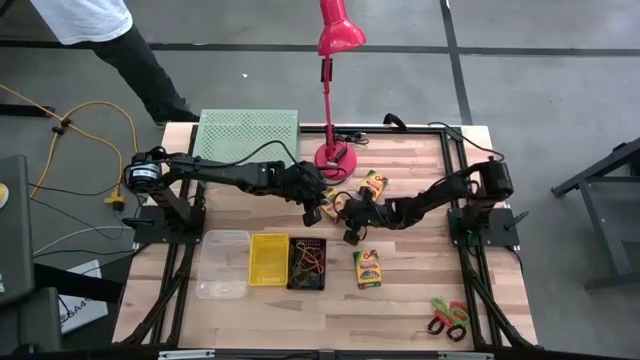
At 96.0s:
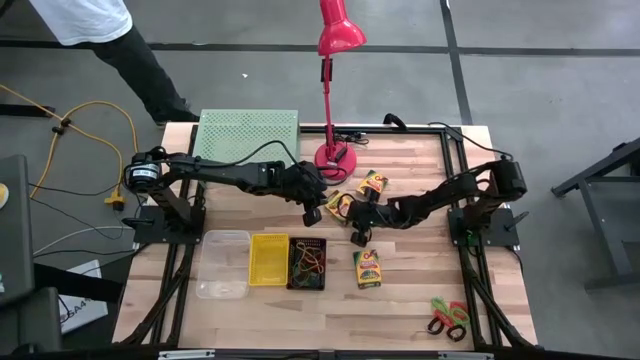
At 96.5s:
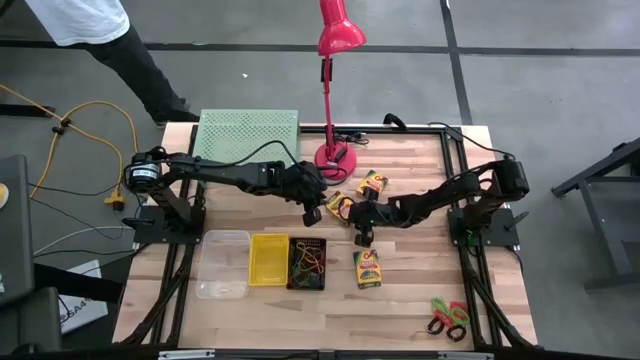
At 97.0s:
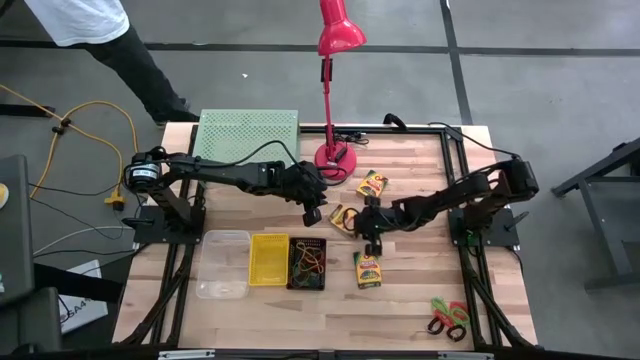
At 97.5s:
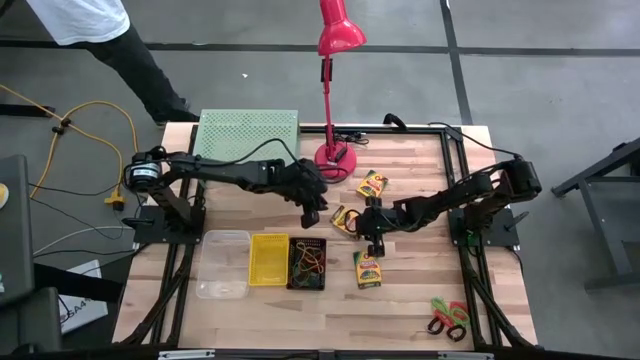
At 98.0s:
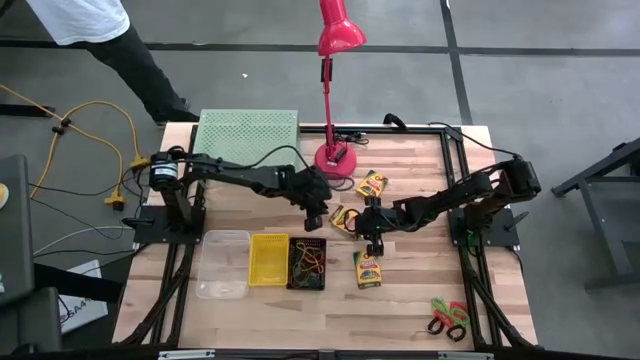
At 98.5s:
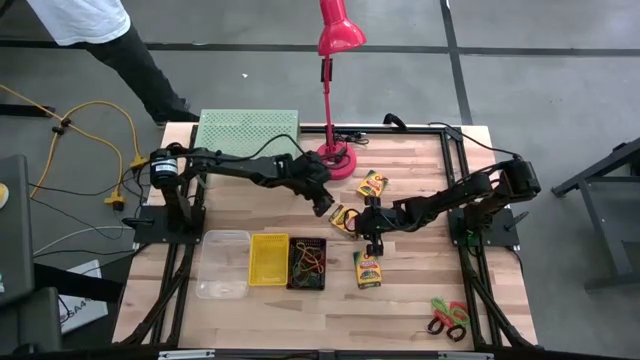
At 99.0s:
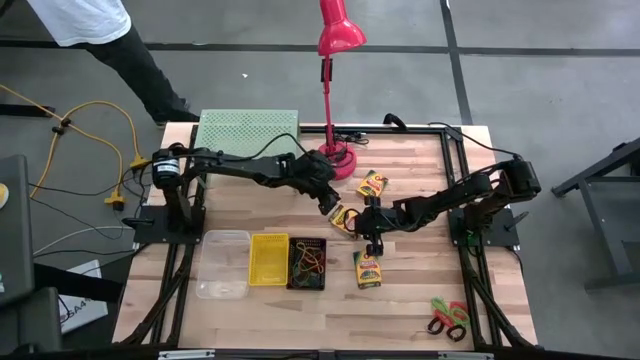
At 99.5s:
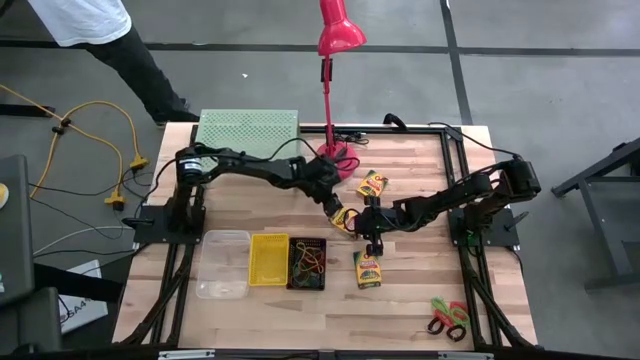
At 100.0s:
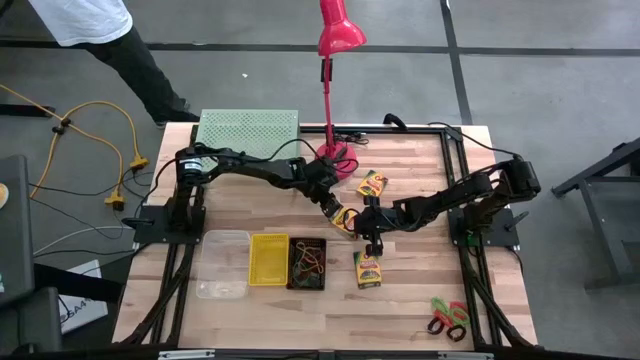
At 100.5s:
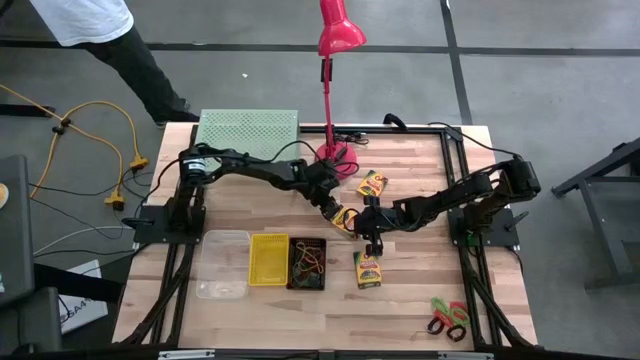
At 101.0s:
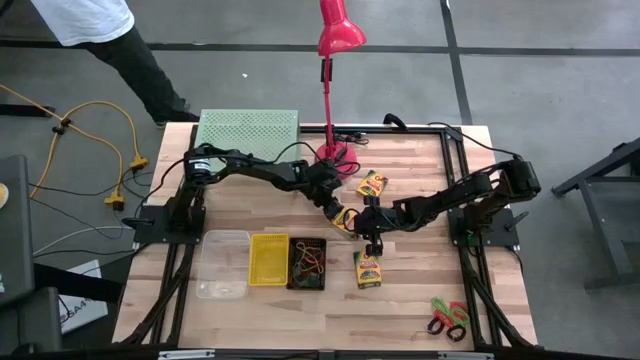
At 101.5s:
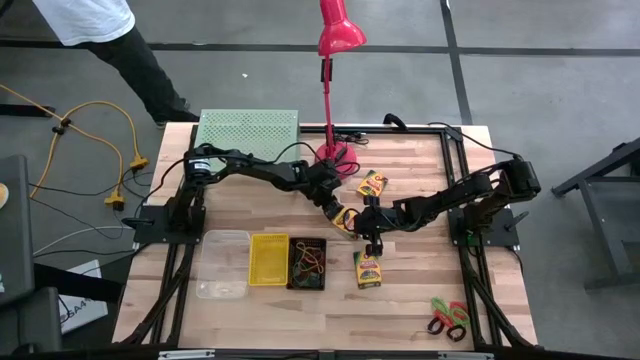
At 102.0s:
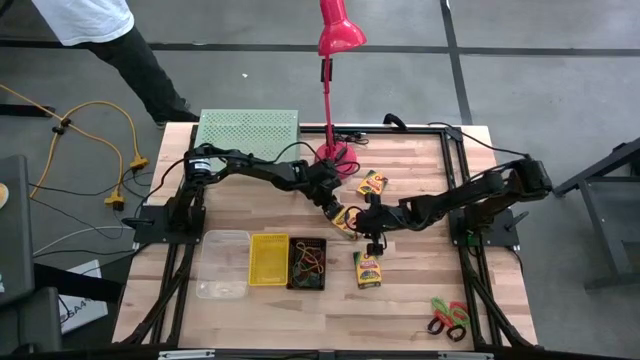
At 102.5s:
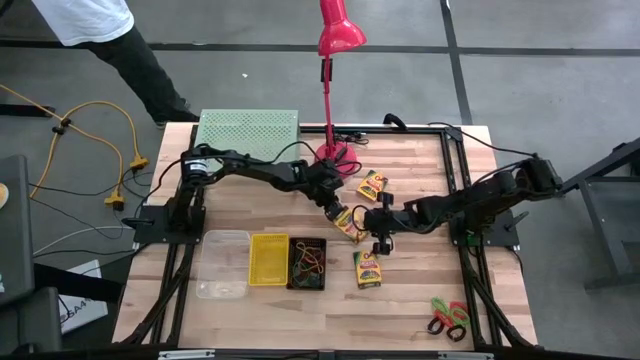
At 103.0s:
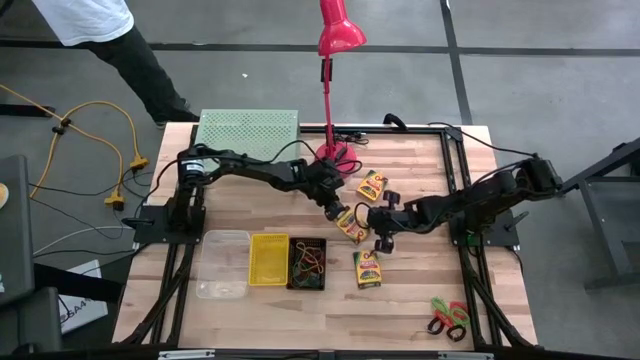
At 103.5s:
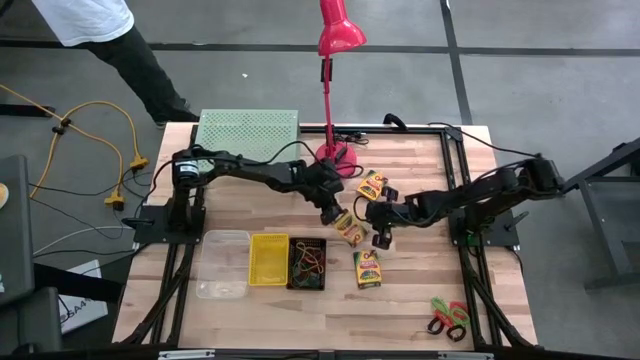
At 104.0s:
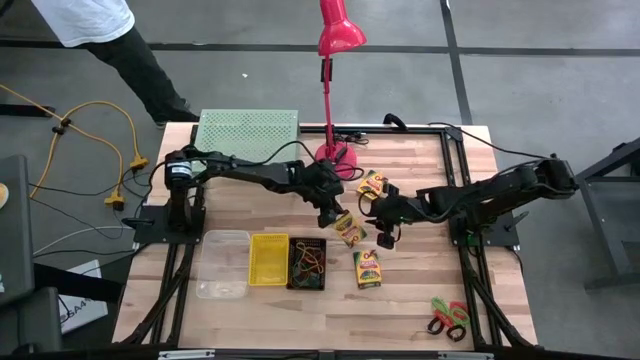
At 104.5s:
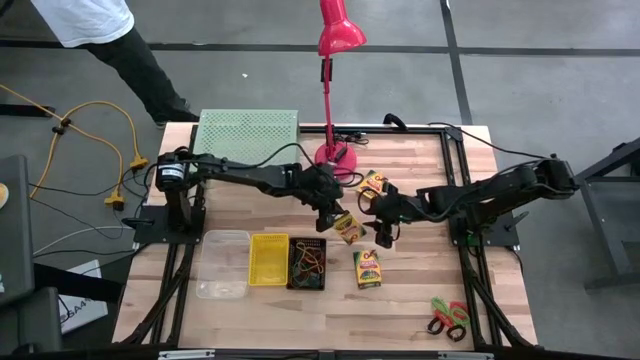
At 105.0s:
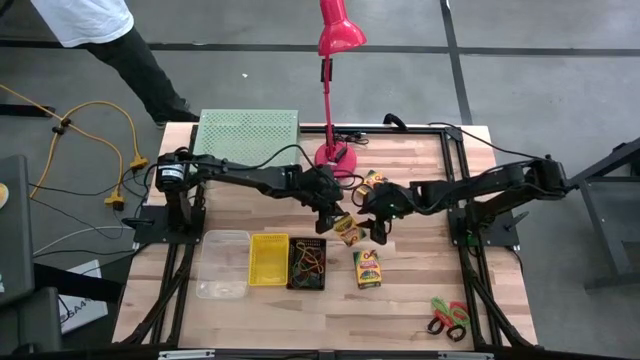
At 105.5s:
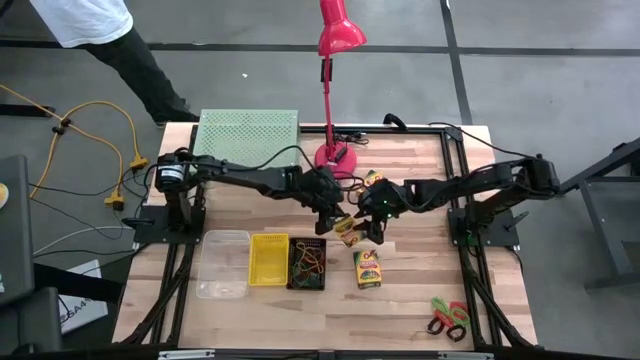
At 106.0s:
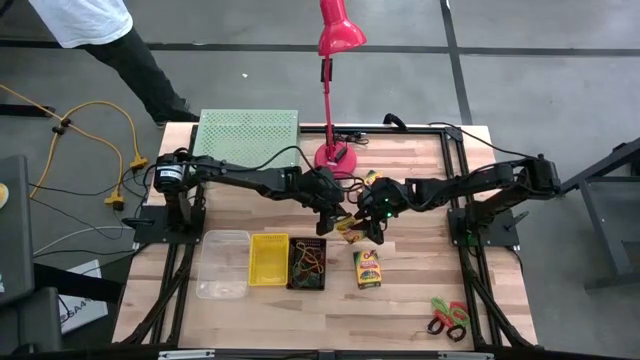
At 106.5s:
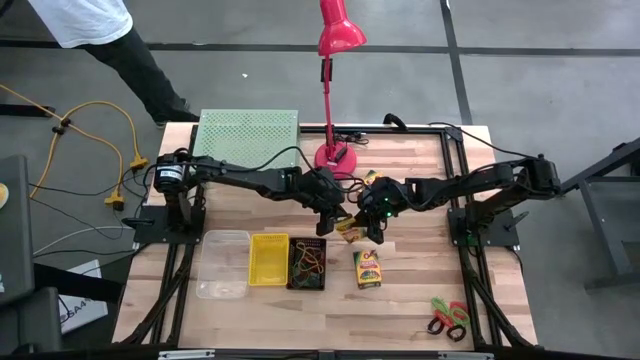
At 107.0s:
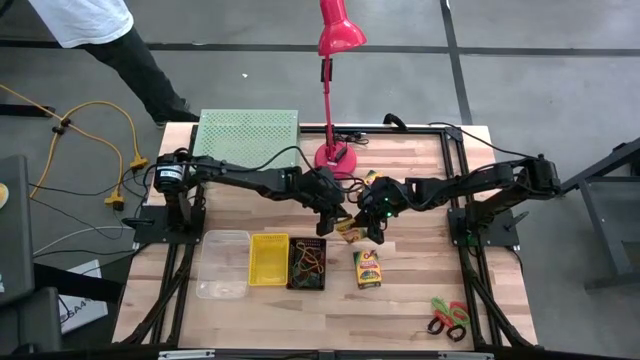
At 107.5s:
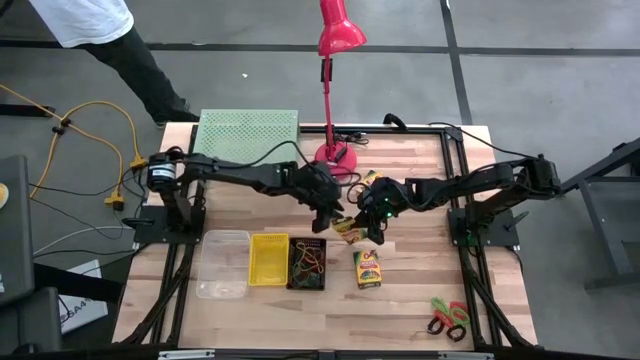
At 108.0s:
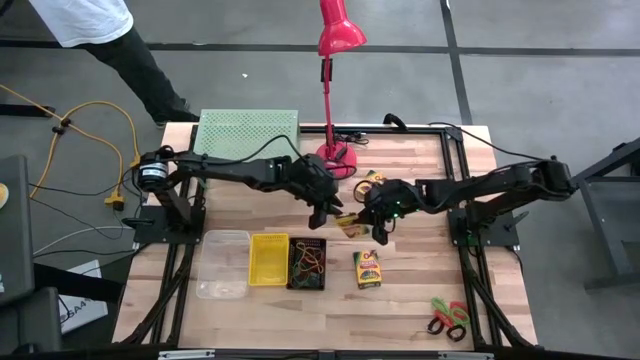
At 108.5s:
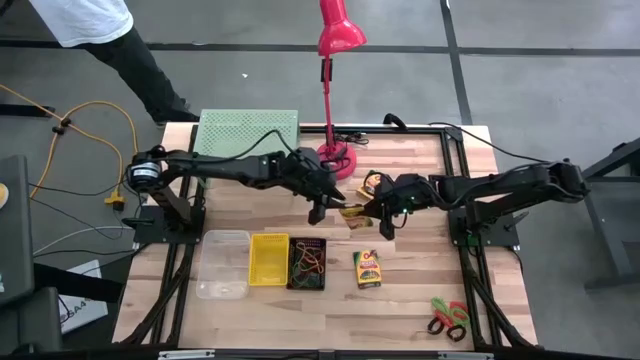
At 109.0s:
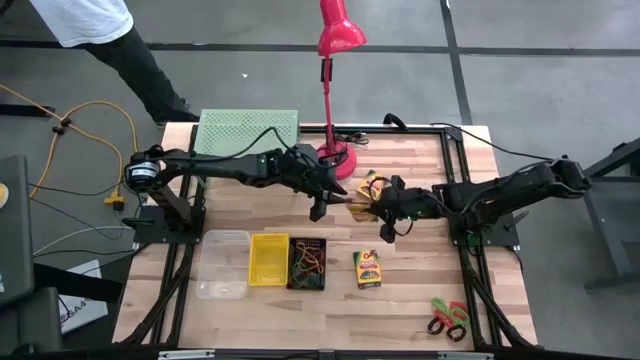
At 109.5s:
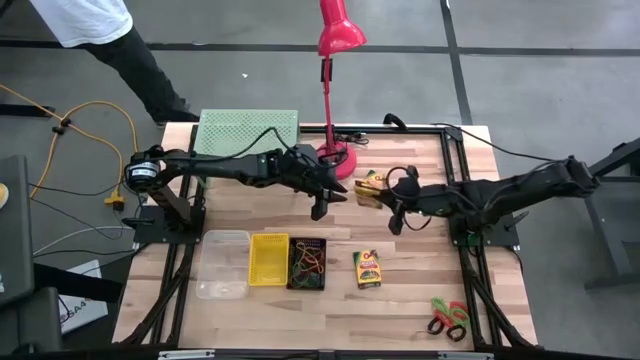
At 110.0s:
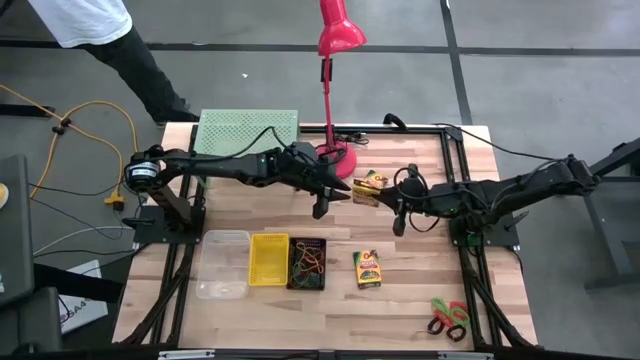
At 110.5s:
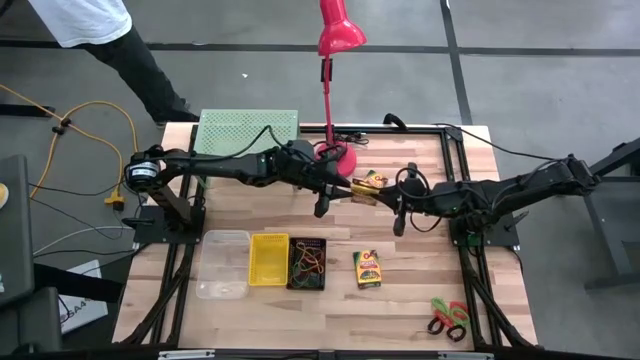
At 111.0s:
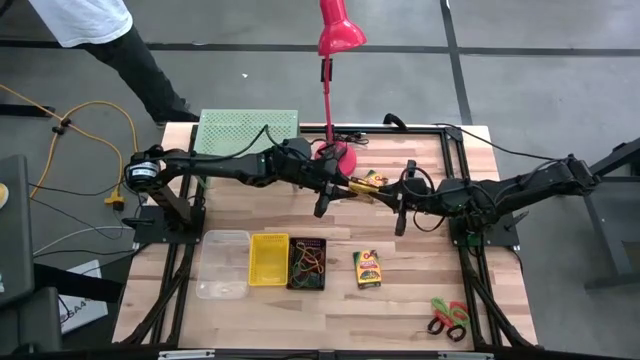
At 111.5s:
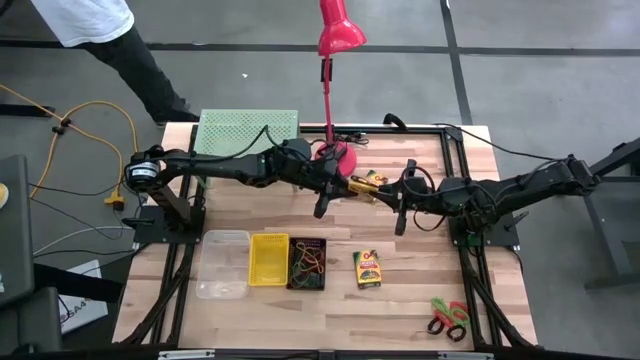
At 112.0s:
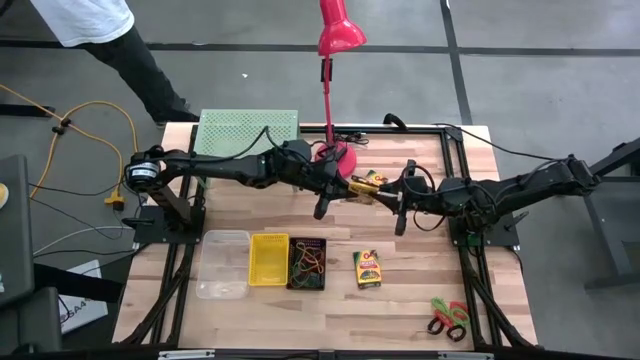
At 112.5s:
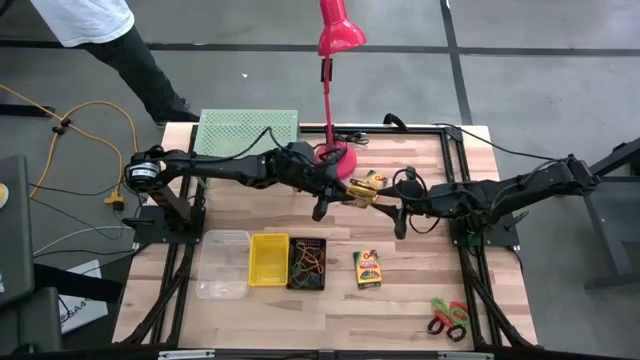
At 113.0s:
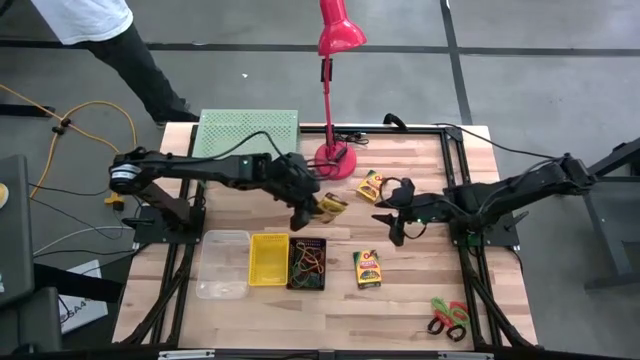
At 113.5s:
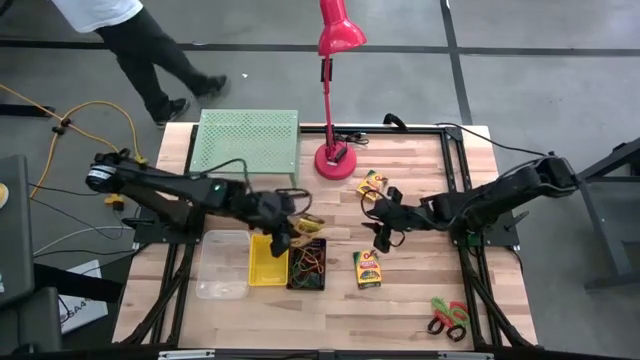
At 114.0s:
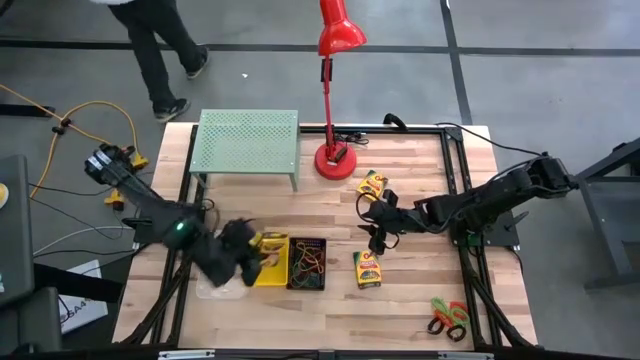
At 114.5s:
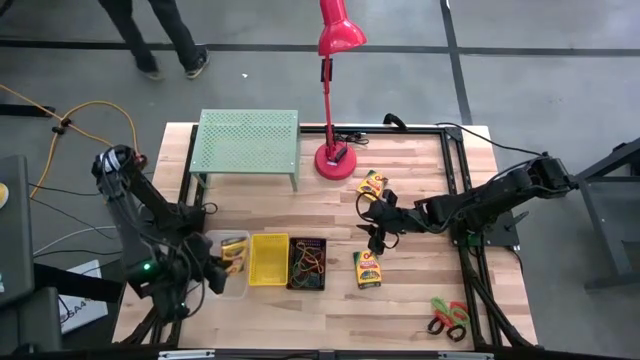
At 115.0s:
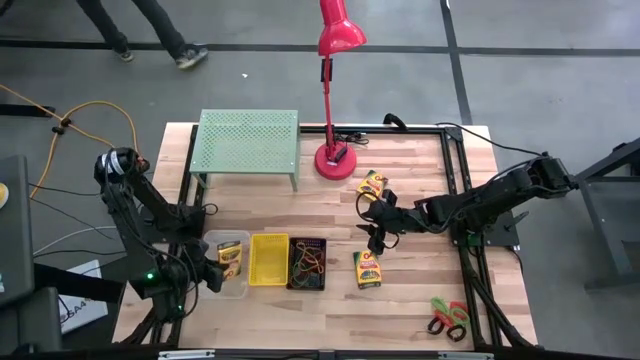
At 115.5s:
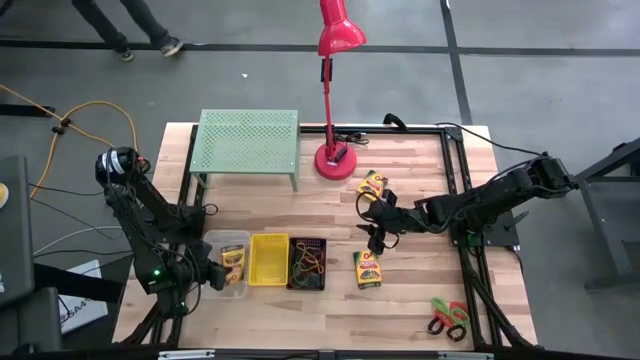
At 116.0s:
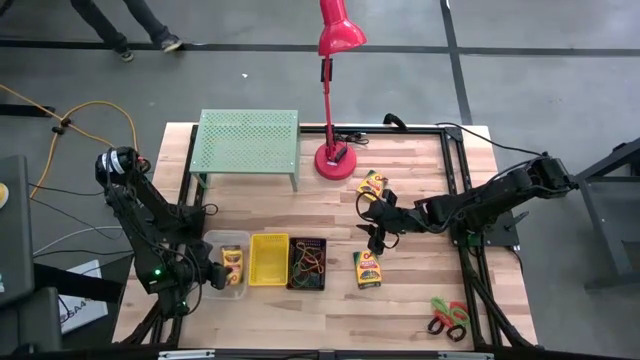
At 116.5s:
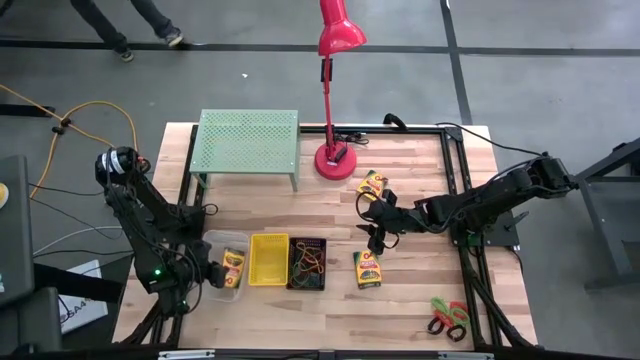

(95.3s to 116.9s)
Task: Pick & Place Office Desk Supplies
Put the crayon box into the transparent bin
